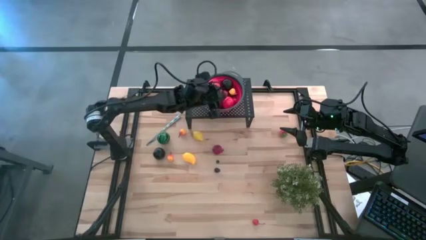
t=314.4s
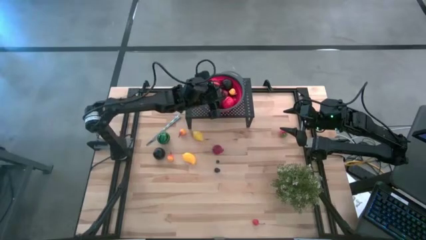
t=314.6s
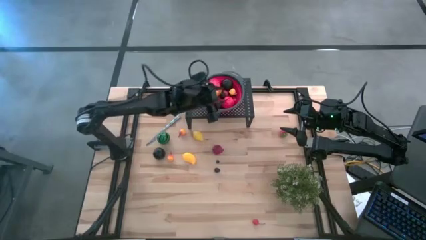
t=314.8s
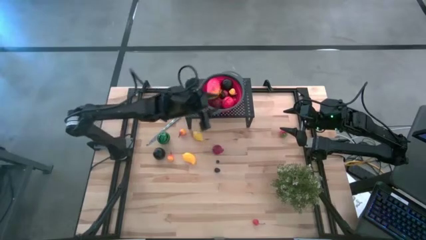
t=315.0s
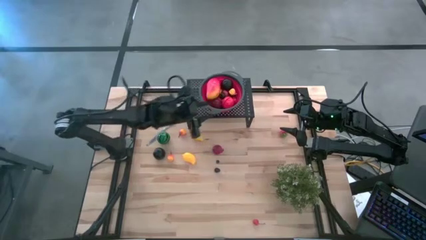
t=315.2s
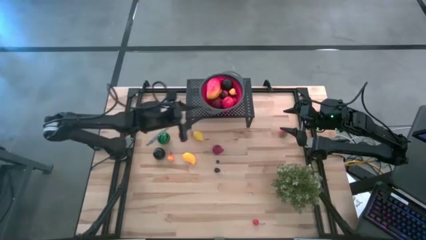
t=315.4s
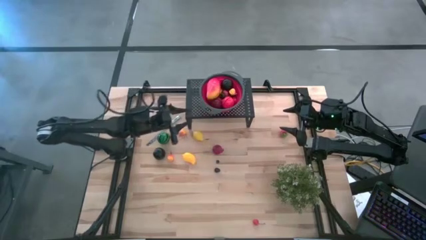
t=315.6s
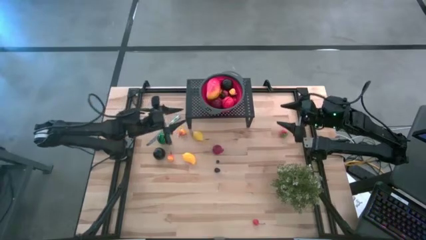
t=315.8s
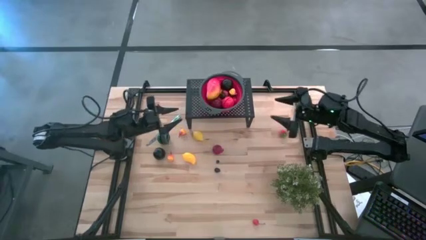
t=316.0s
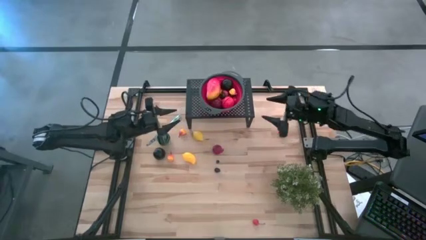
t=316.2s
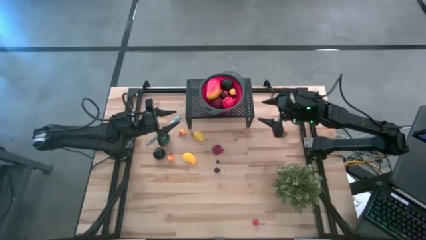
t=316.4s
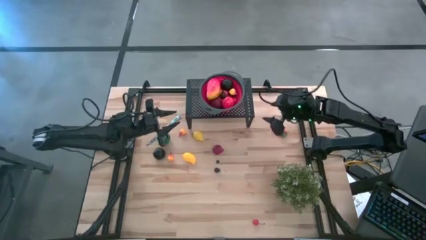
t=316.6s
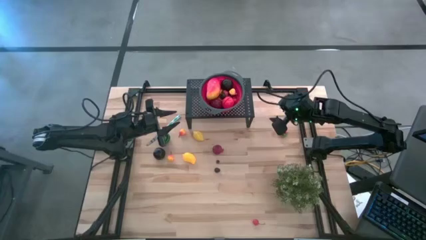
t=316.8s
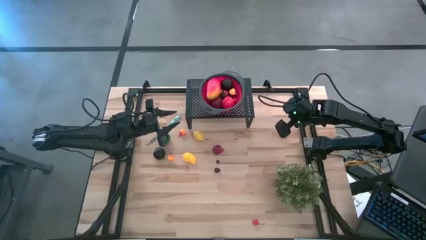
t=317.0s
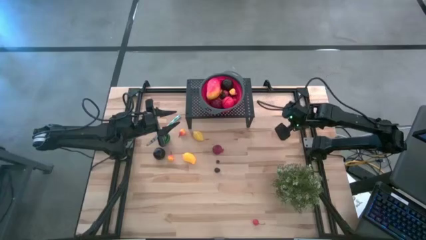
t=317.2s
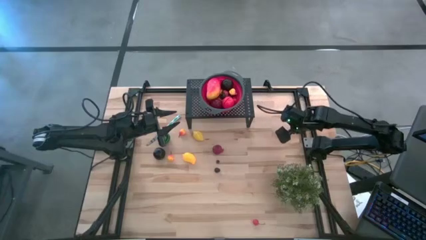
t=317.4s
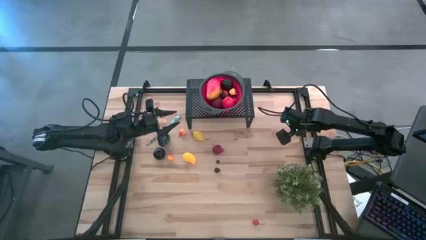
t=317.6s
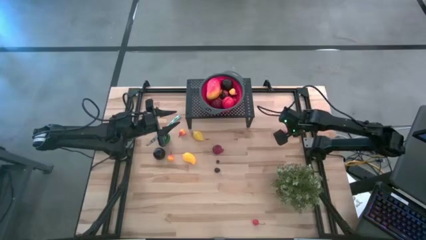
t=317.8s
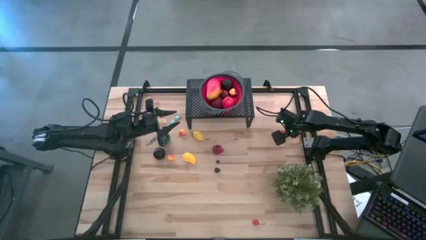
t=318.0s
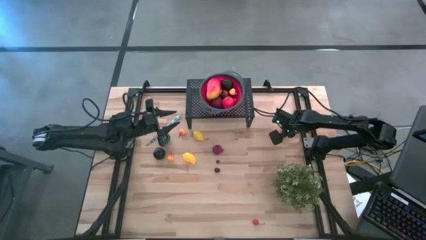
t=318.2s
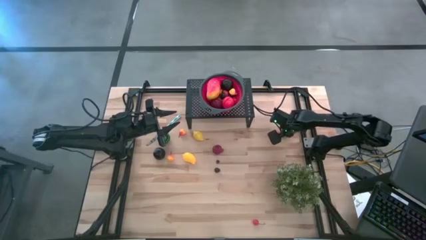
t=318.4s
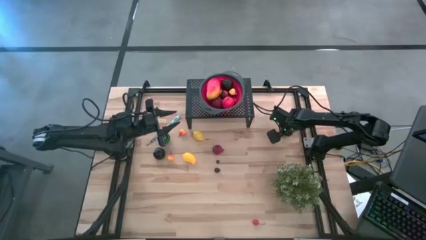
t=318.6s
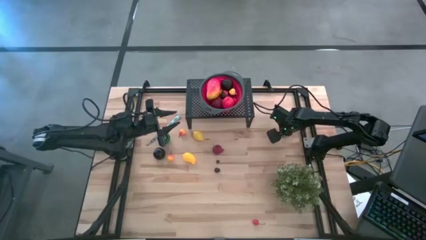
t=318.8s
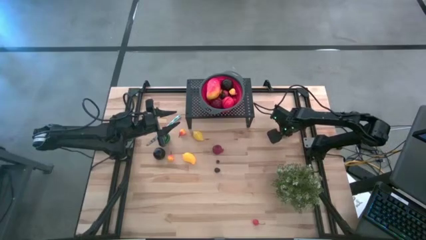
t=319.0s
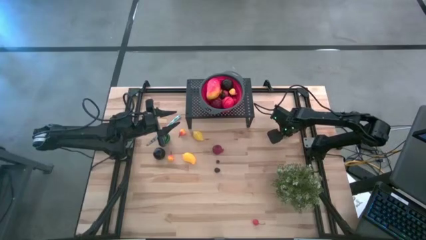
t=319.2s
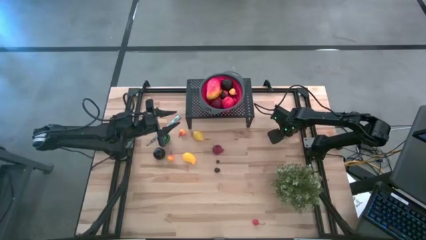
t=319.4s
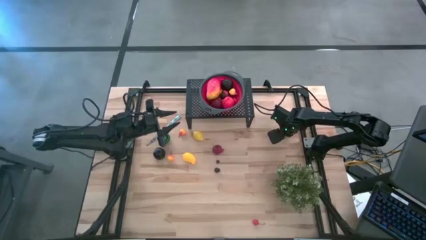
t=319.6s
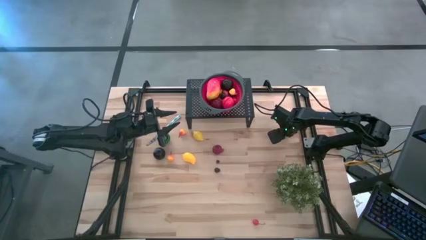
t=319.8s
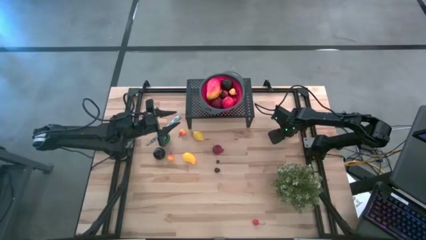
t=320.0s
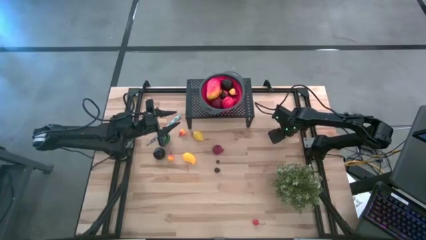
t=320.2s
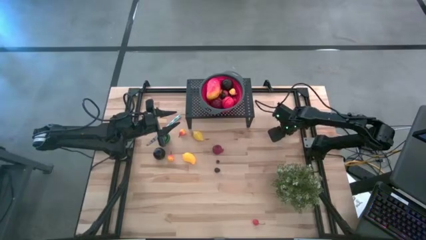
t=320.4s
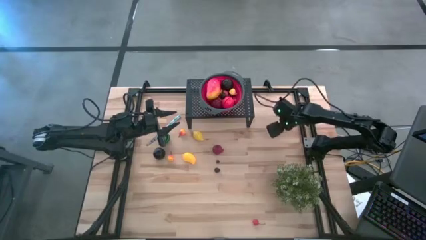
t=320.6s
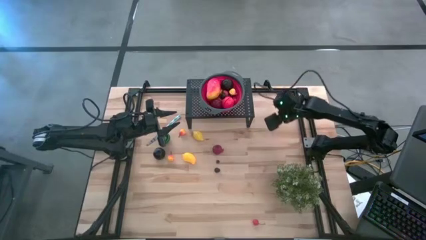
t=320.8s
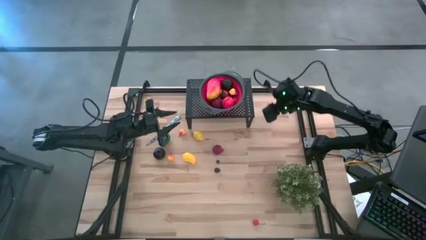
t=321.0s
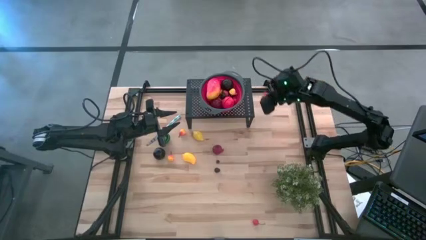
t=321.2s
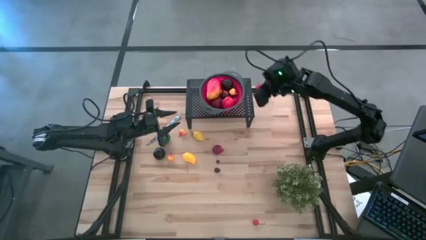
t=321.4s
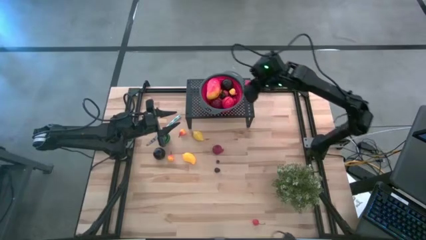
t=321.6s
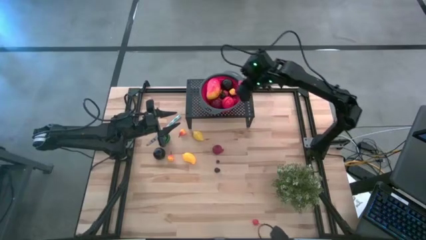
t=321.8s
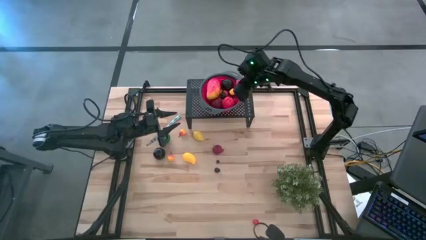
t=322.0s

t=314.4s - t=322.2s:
Task: Pick & Place Fruit
Put the strawberry in the red colander on the shelf

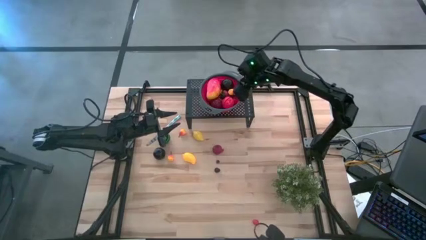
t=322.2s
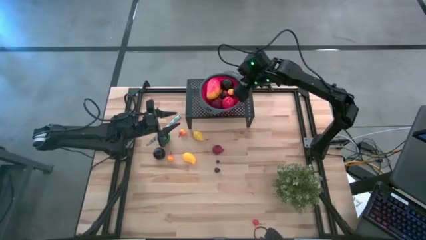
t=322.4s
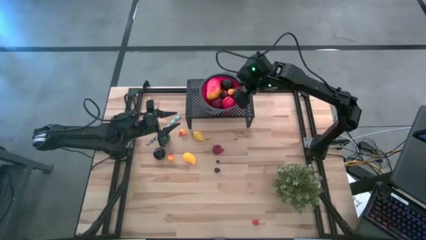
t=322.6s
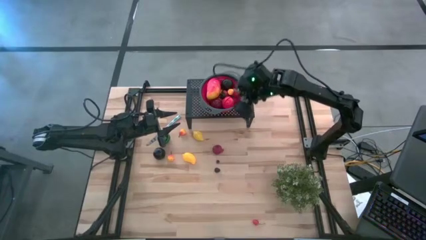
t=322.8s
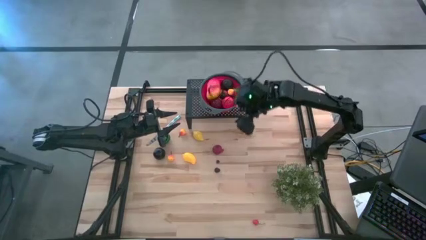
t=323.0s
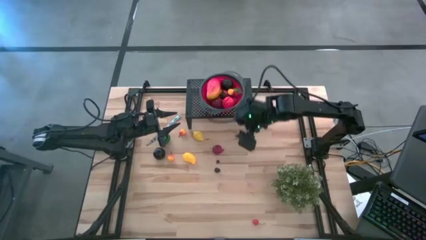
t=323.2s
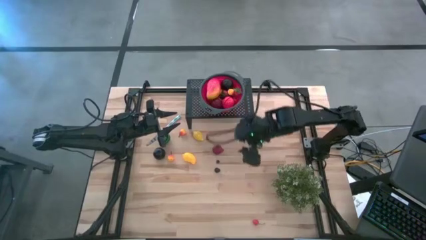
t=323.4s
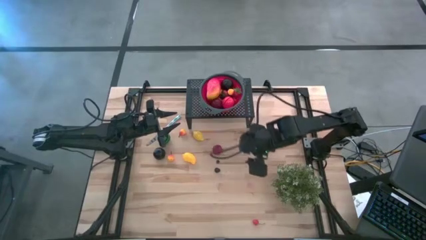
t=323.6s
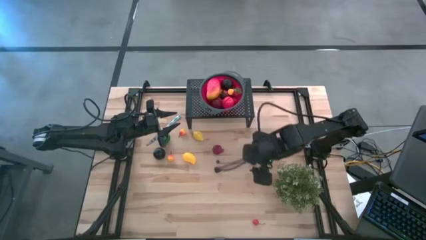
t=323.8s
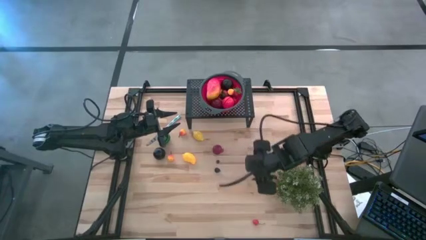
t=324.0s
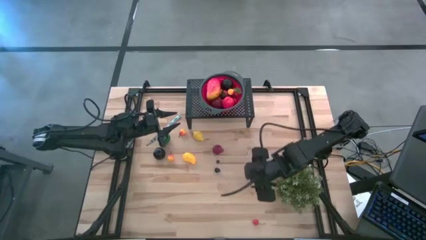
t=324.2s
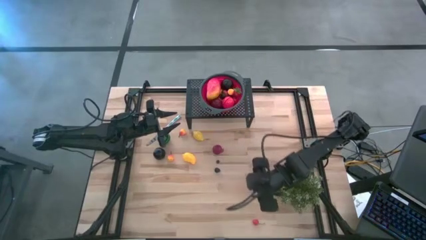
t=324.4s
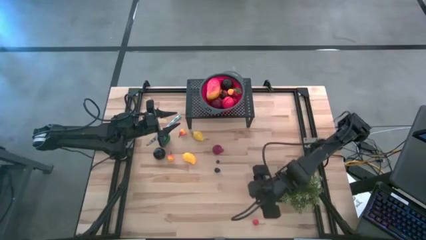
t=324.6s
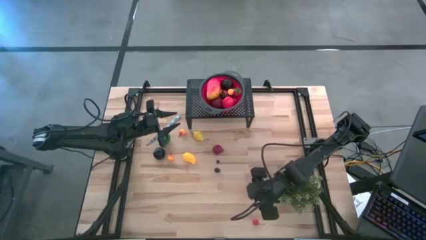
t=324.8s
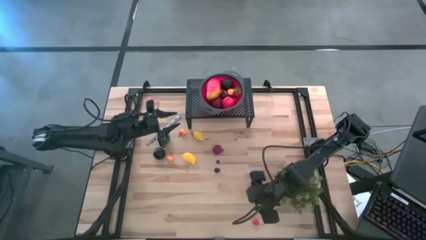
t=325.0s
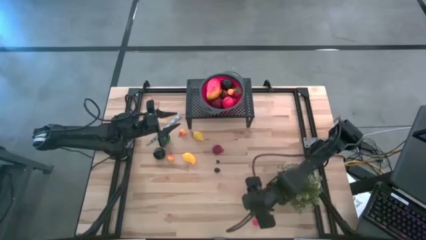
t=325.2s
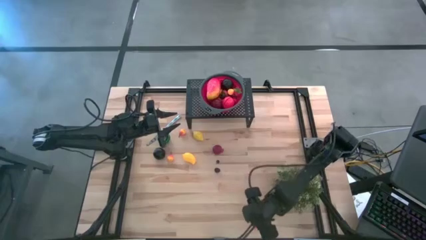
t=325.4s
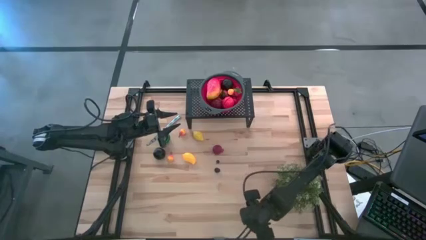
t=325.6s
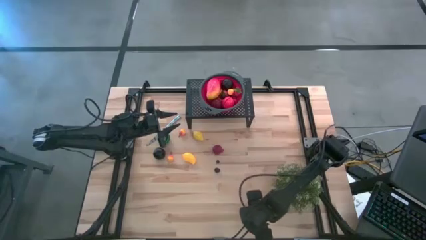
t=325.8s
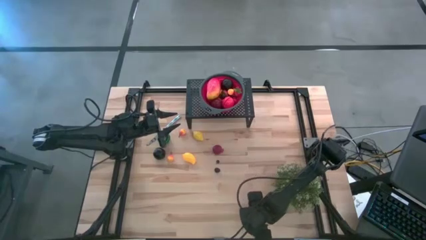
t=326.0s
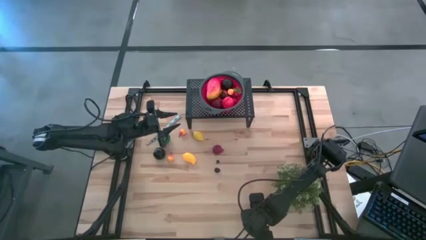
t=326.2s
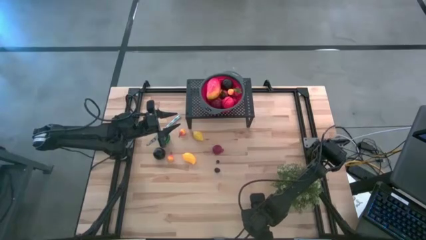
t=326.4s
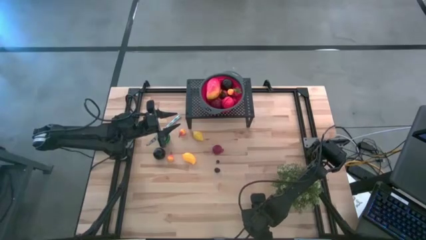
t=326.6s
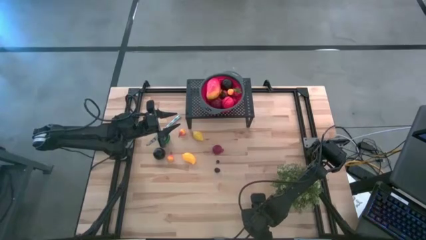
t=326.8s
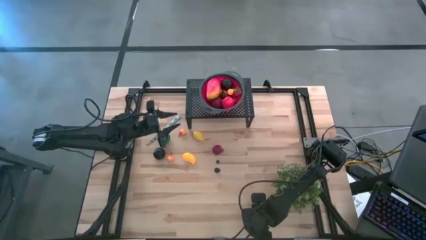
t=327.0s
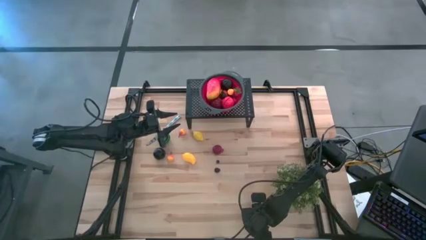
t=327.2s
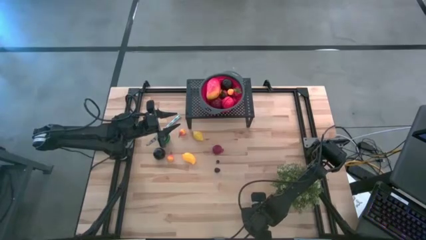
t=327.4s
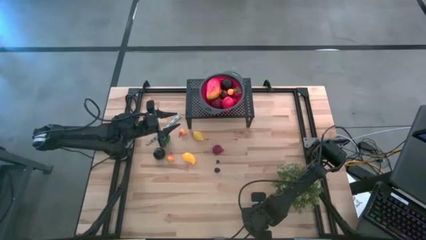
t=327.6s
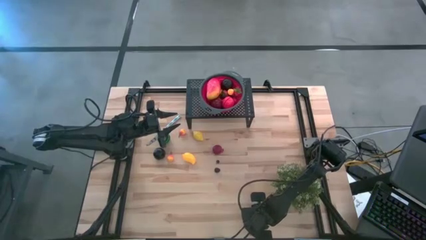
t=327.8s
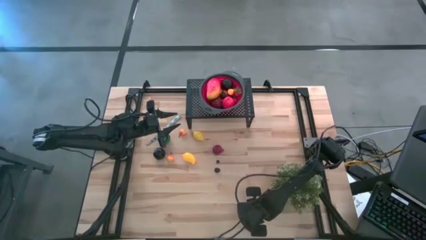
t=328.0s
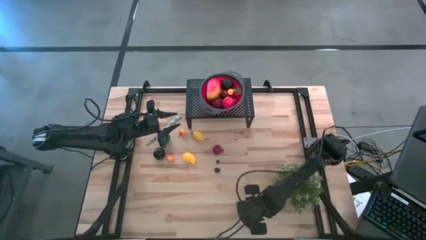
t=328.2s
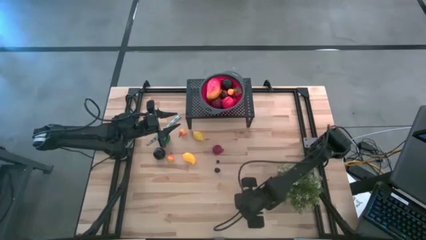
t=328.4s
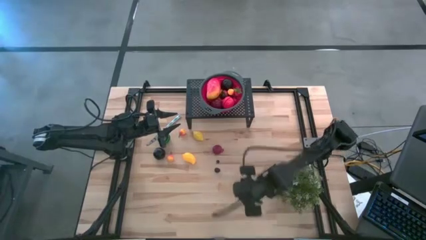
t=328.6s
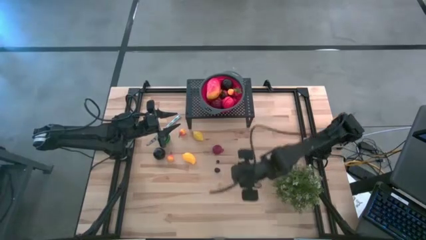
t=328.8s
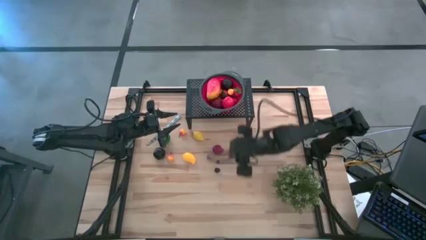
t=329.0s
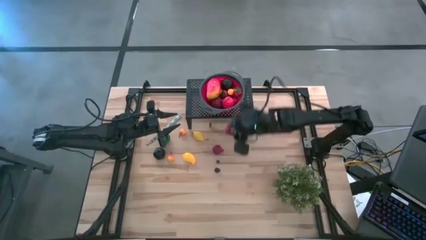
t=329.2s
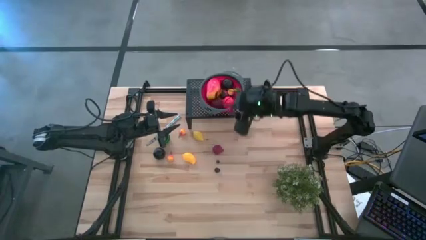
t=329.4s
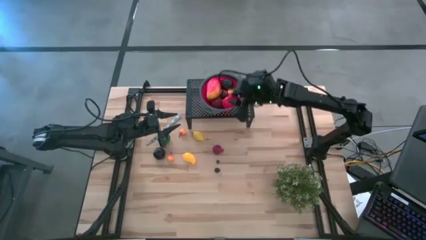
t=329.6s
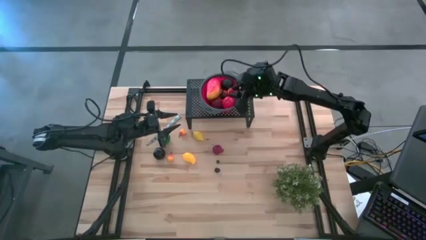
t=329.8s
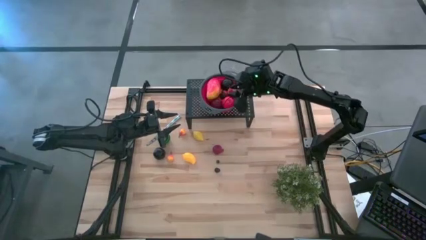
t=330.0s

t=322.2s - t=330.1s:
Put the red cherry in the red colander on the shelf

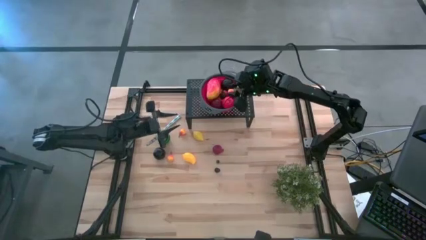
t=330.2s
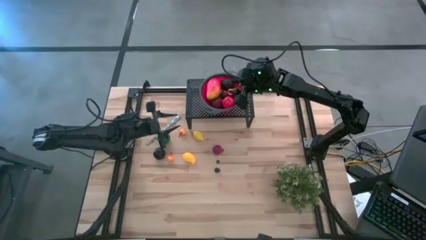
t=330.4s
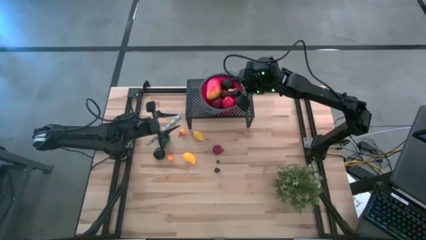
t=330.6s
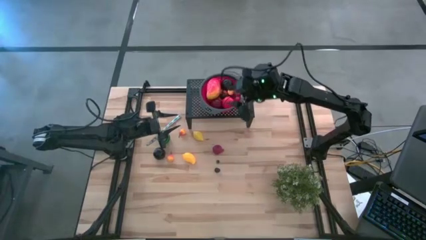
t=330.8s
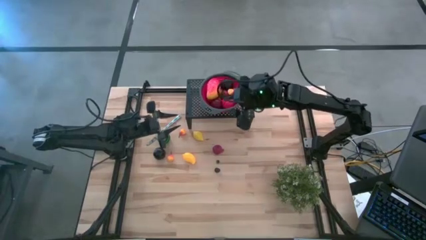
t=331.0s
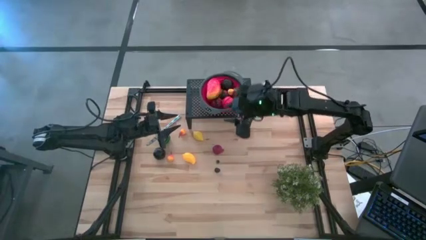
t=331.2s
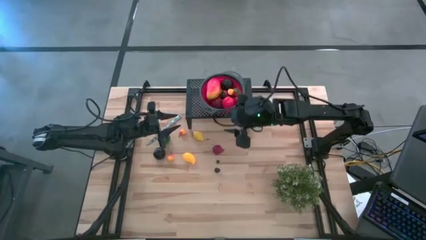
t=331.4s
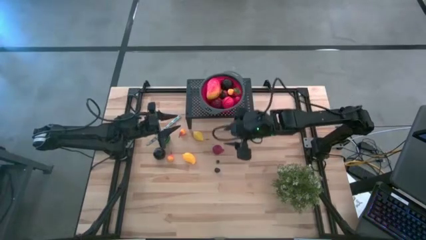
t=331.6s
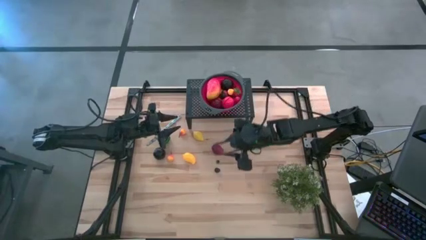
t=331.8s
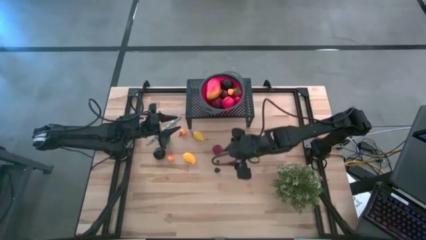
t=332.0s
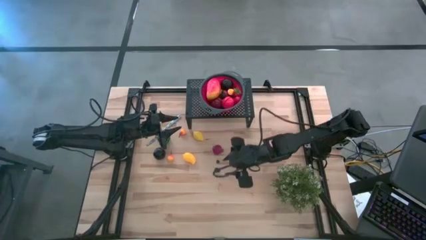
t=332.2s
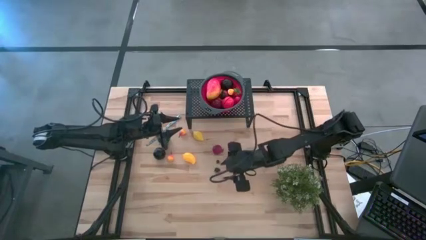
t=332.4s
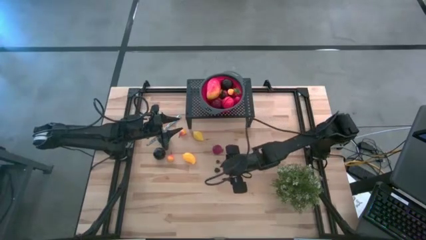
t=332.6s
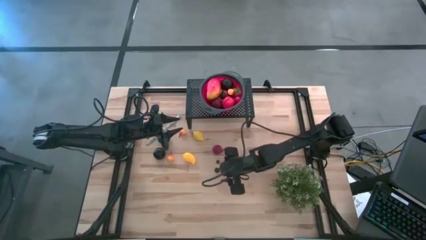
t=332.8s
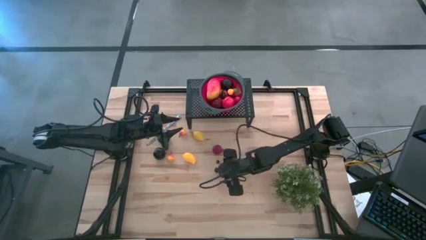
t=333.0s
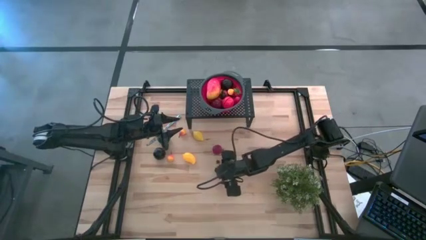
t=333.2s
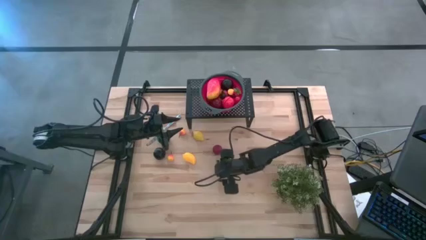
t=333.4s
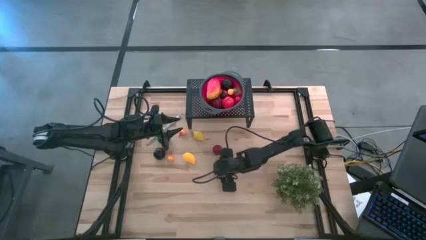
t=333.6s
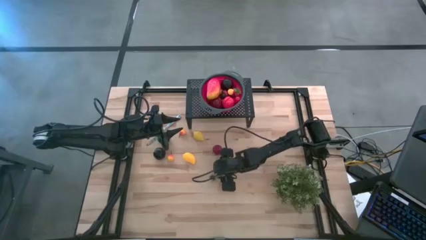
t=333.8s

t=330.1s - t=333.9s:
Put the blackberry in the red colander on the shelf
